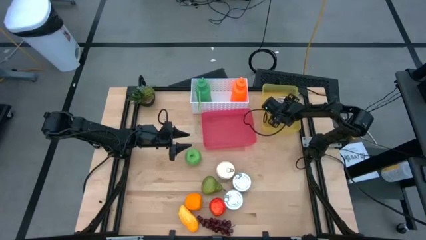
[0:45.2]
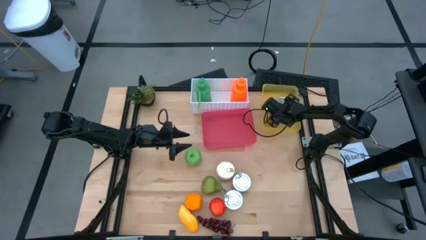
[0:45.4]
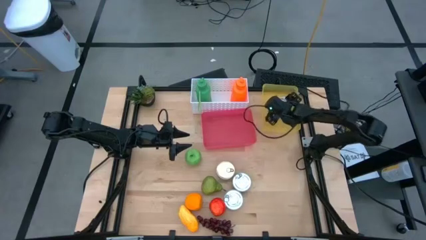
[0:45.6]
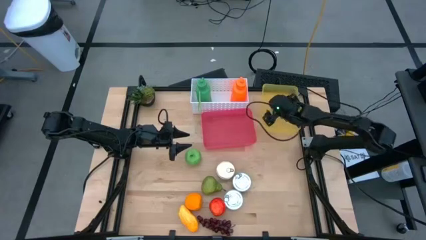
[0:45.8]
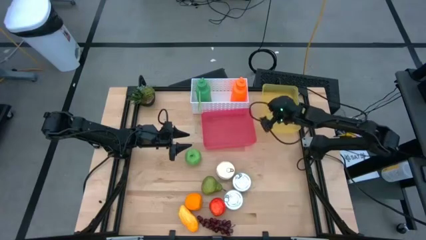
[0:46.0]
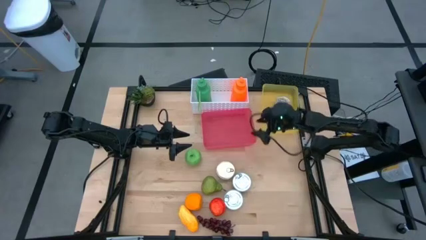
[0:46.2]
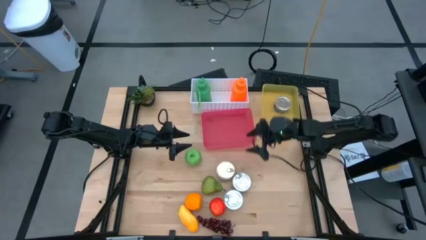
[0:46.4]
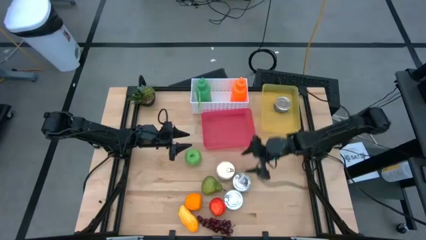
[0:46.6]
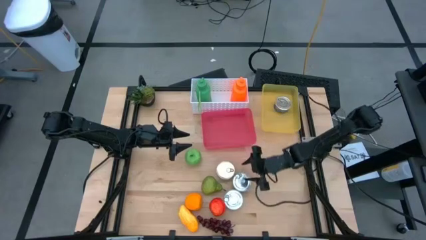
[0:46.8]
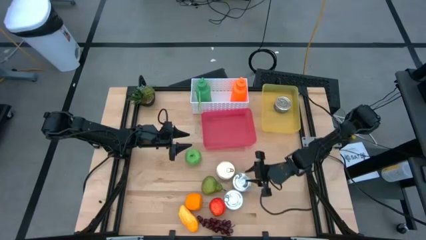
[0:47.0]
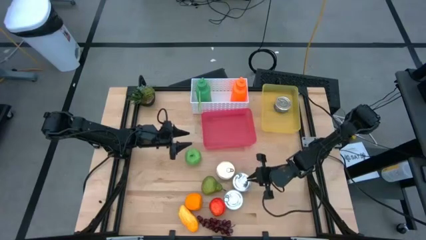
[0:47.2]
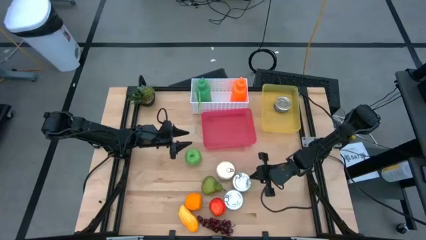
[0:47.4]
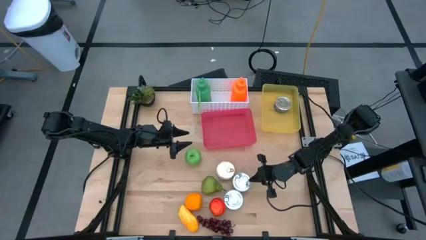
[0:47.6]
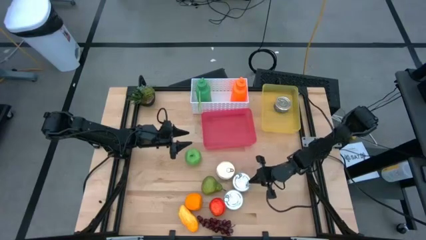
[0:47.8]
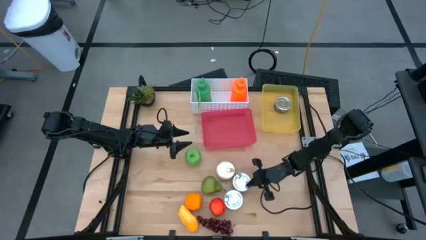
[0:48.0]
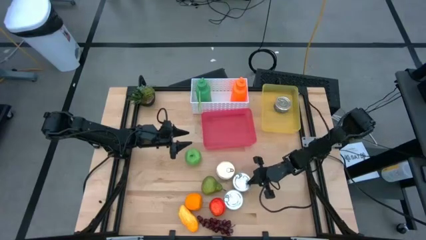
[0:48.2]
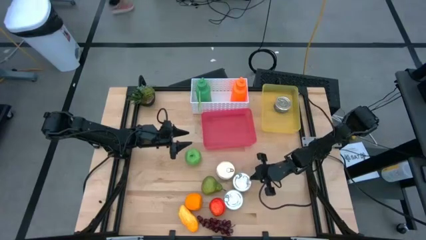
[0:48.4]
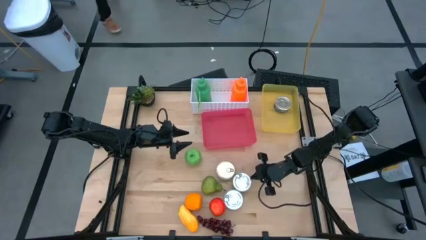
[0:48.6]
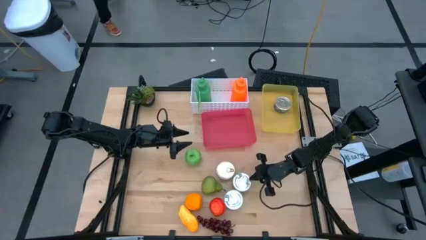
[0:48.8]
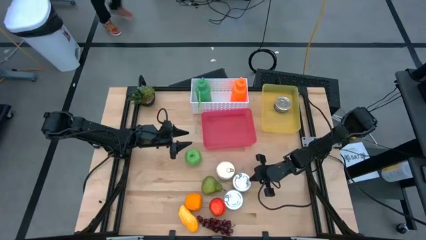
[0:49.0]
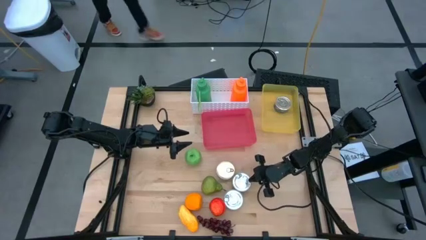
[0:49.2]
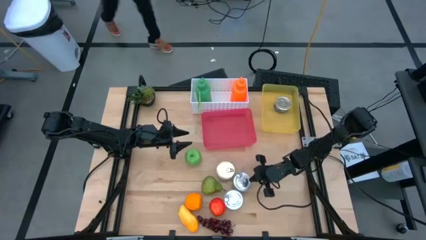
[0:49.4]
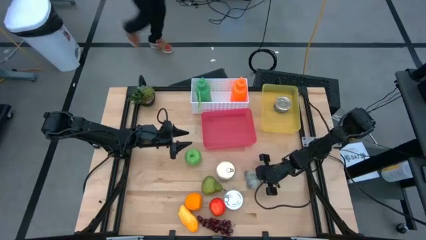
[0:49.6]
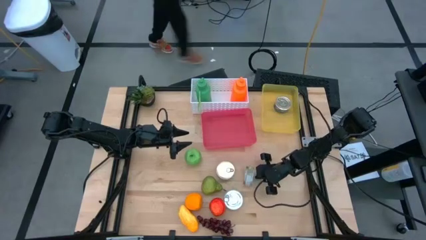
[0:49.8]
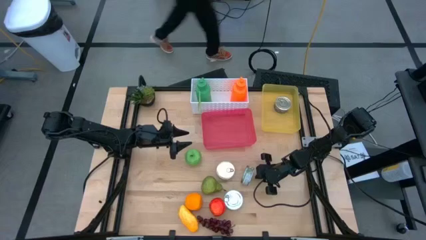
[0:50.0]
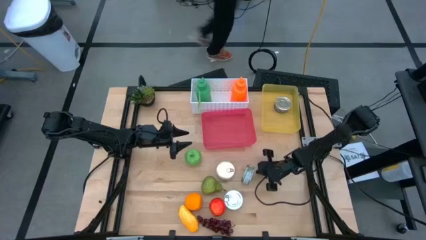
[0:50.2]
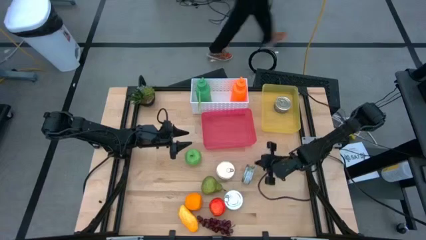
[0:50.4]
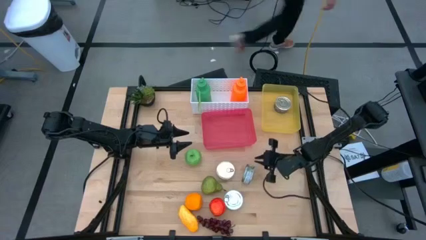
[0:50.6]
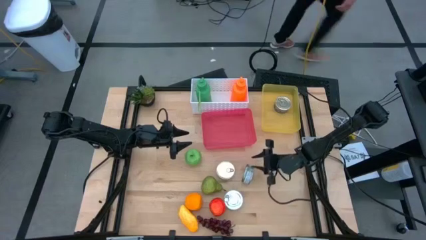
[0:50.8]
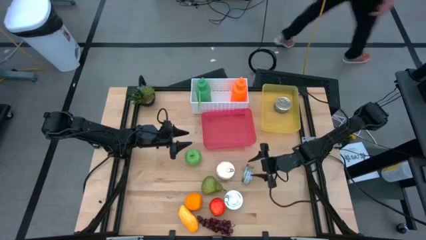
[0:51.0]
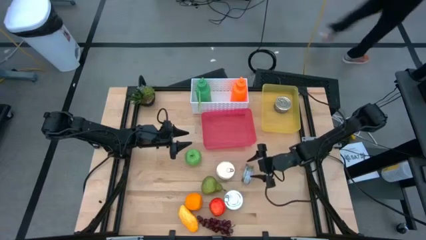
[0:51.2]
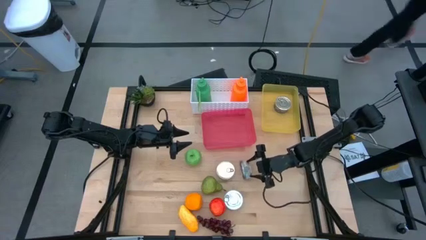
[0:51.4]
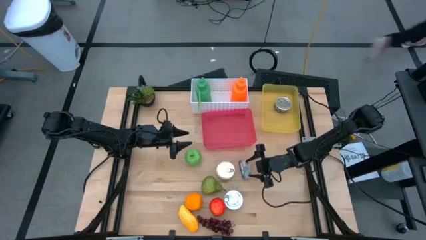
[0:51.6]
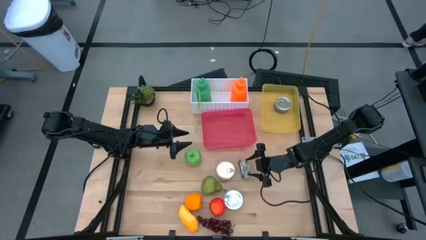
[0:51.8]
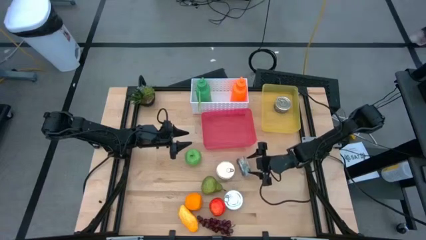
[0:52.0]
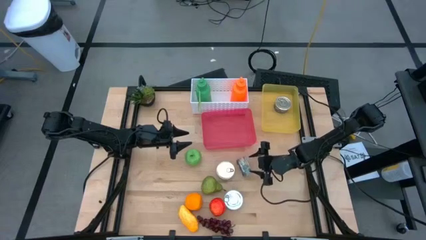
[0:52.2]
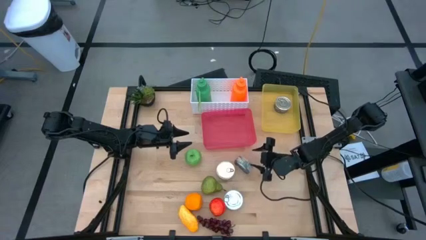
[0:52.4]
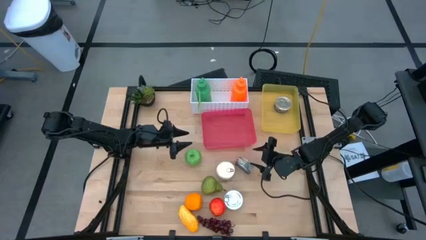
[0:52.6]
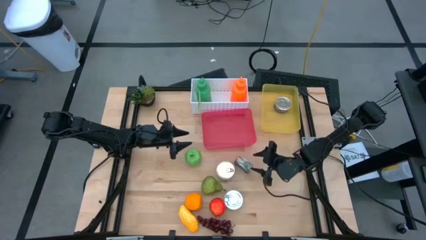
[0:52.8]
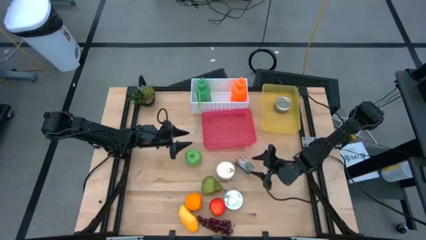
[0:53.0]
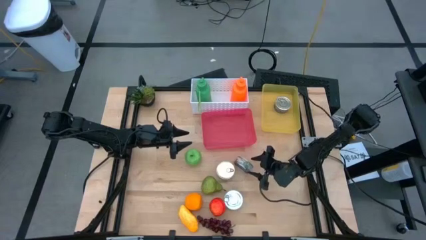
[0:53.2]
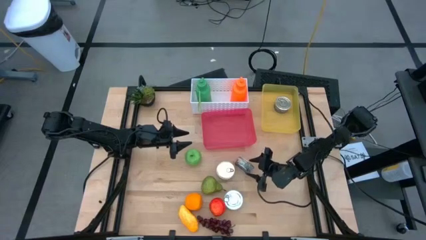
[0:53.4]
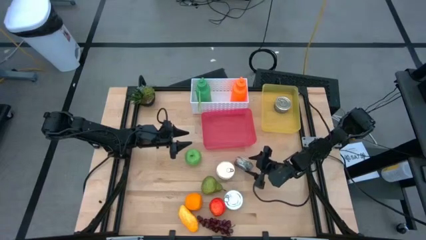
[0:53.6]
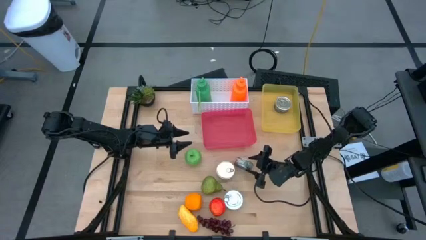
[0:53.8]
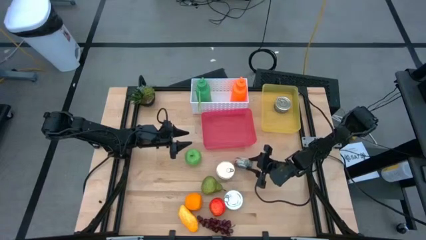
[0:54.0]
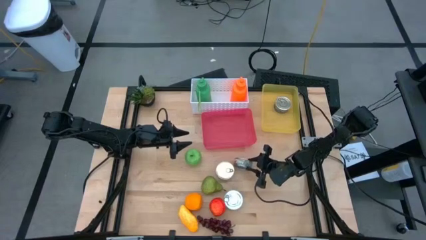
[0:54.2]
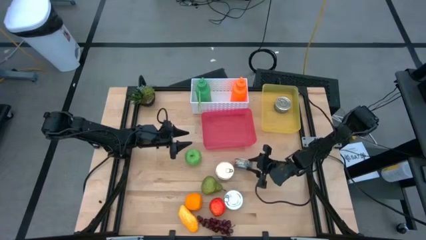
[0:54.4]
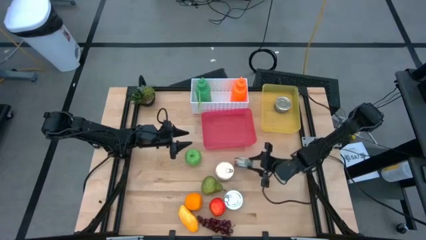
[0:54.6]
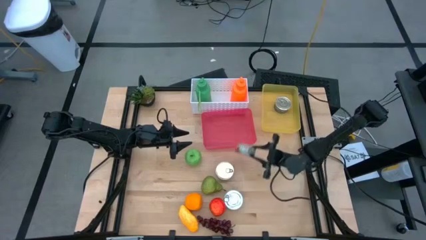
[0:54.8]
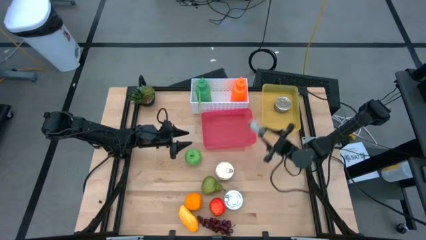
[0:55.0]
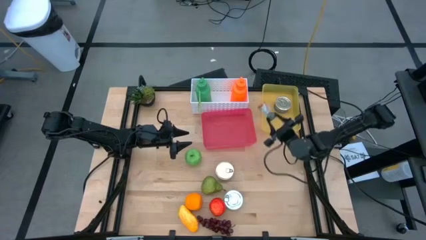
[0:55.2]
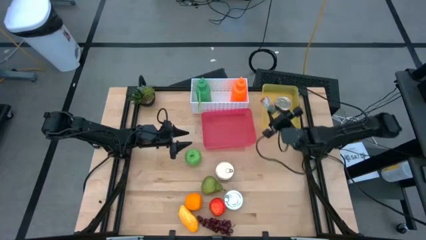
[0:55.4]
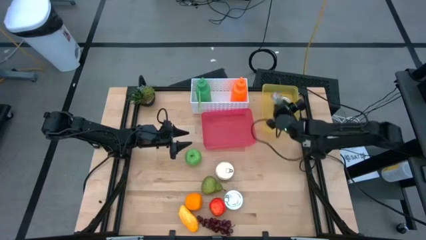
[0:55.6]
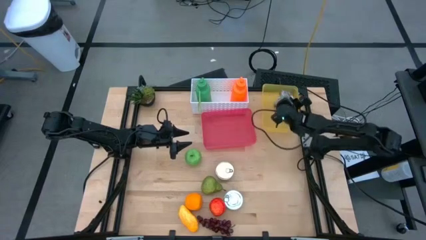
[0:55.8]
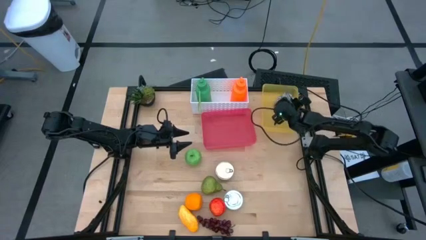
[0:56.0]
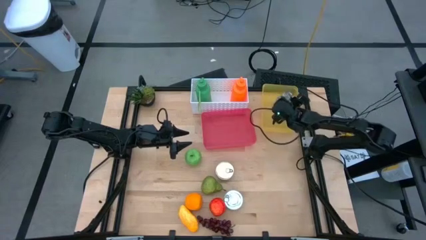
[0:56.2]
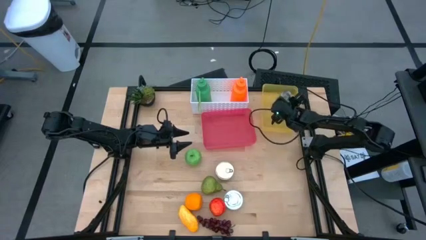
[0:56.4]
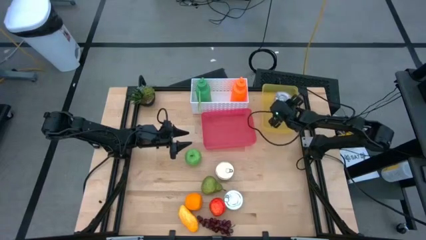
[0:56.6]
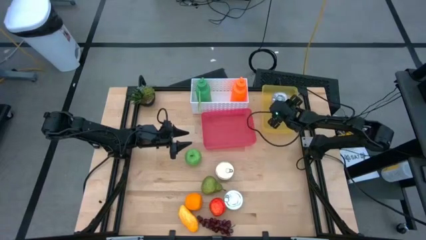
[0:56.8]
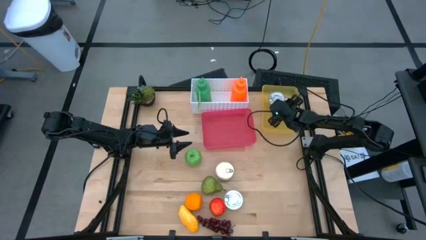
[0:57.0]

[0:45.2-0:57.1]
Task: Pick & Place Food Item
Put the top green tuna can into the yellow bin

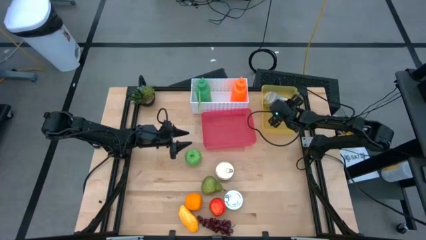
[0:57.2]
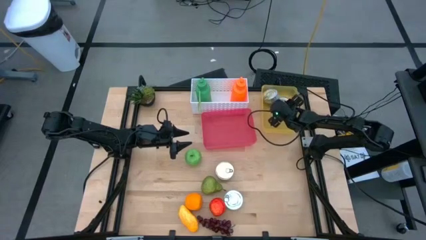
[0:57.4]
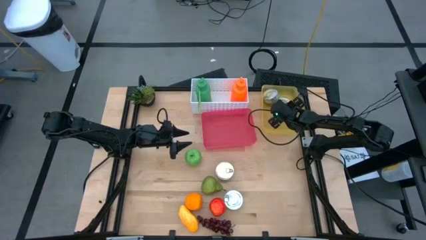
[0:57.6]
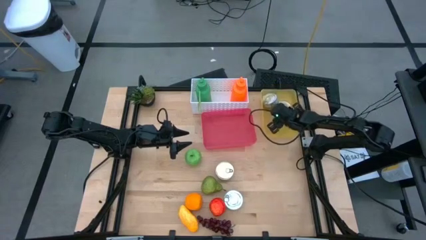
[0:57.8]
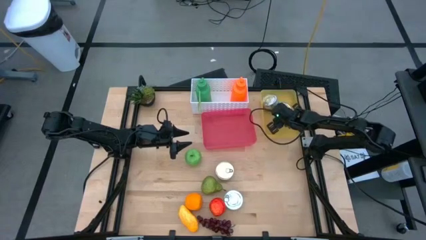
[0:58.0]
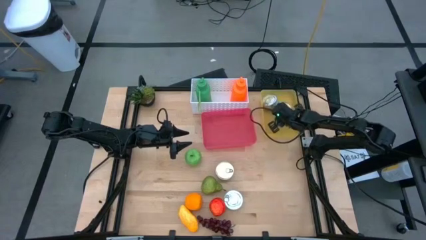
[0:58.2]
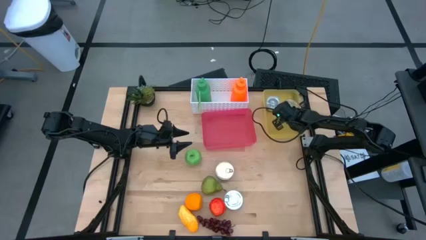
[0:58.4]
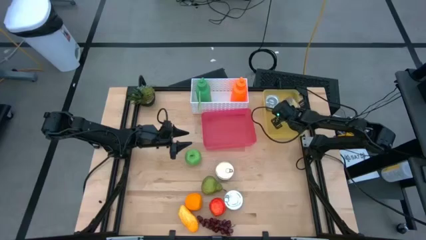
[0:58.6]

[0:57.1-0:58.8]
Adjust the blue and pink tuna can
